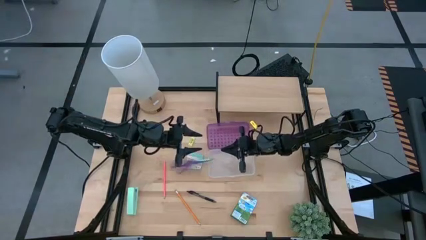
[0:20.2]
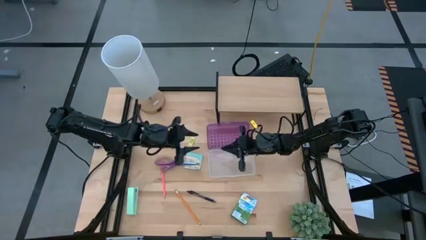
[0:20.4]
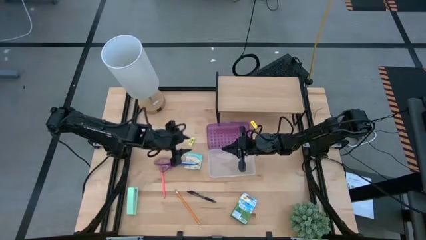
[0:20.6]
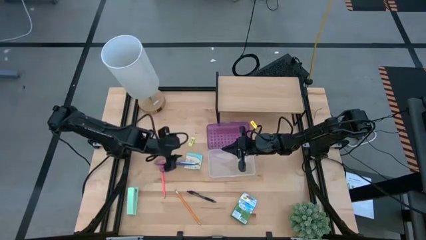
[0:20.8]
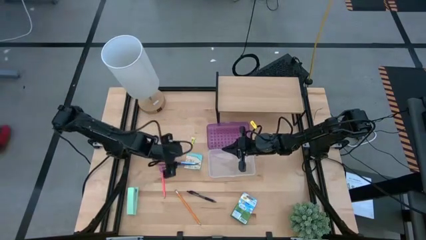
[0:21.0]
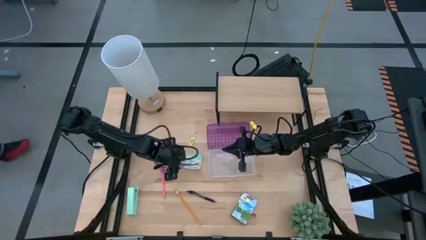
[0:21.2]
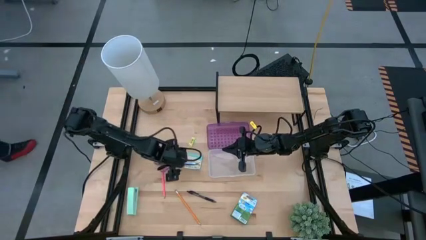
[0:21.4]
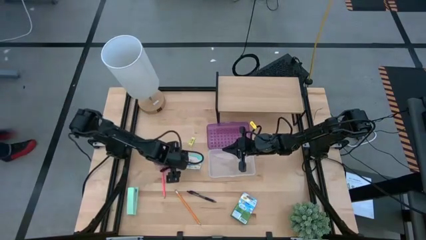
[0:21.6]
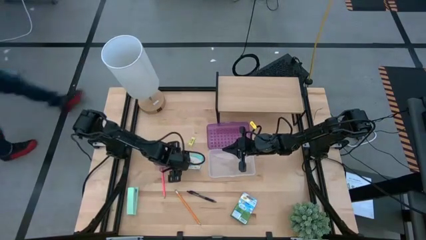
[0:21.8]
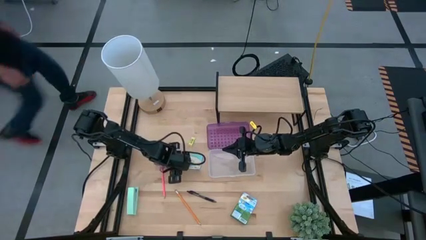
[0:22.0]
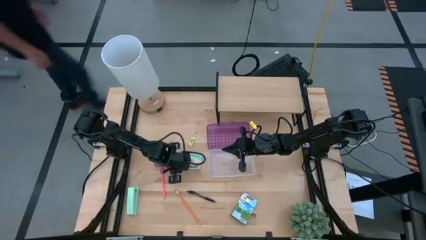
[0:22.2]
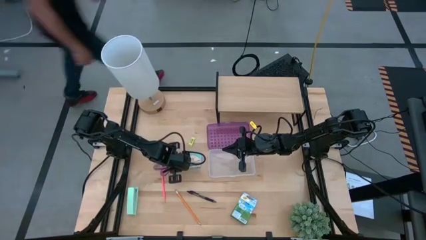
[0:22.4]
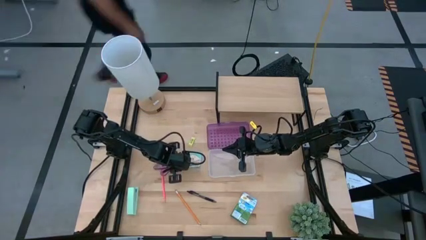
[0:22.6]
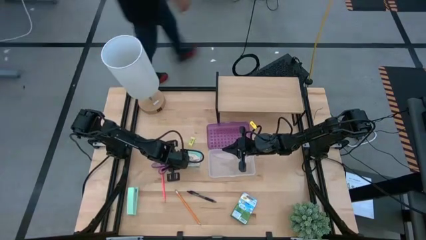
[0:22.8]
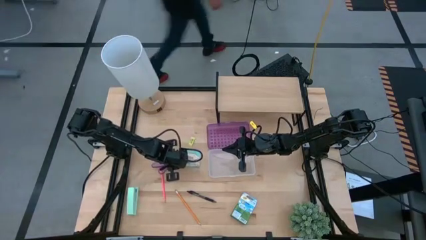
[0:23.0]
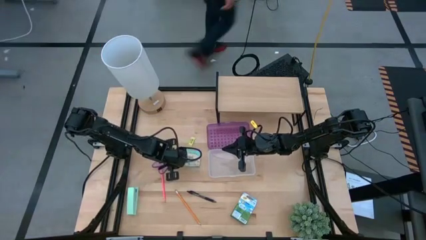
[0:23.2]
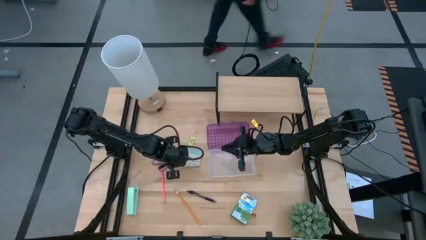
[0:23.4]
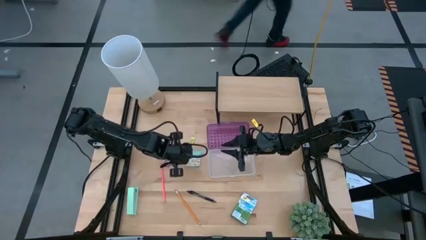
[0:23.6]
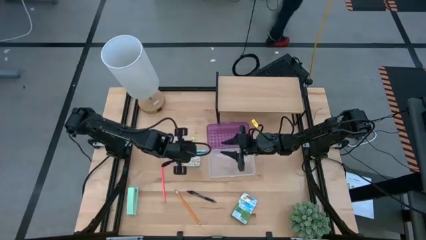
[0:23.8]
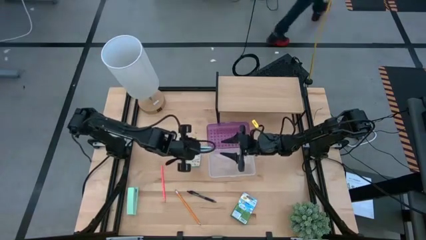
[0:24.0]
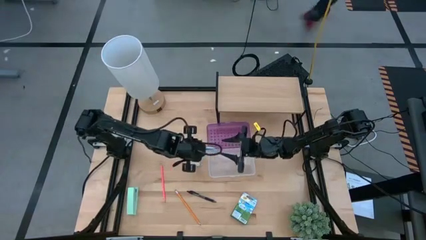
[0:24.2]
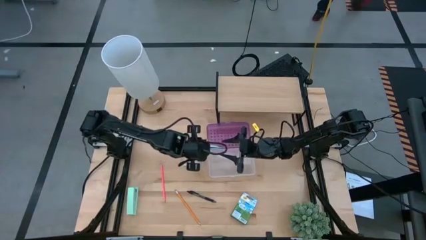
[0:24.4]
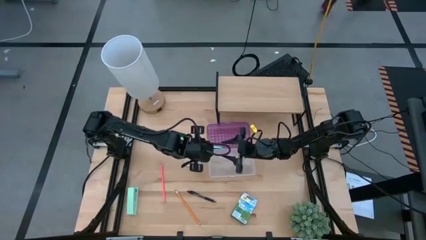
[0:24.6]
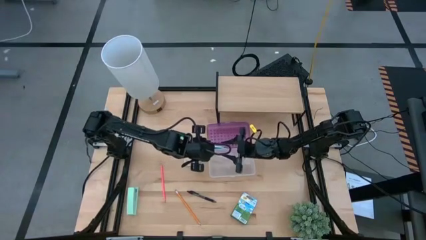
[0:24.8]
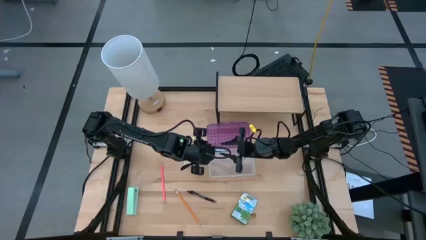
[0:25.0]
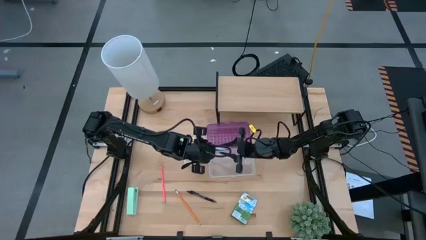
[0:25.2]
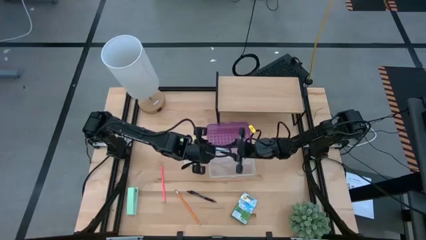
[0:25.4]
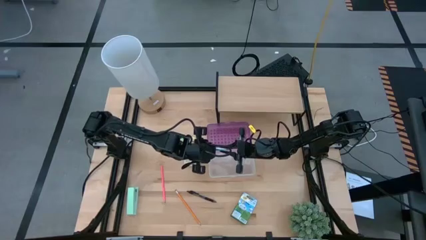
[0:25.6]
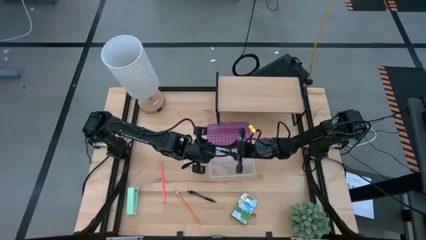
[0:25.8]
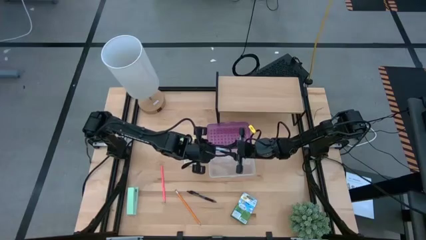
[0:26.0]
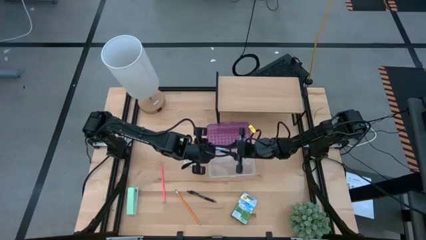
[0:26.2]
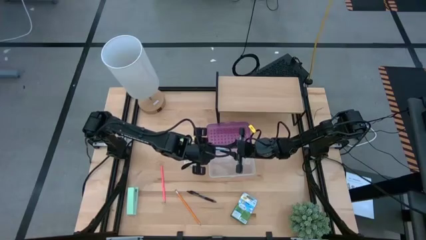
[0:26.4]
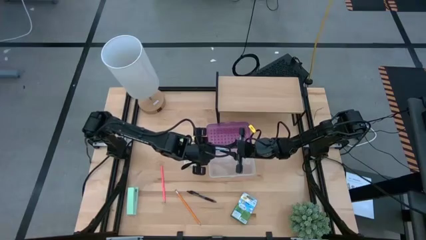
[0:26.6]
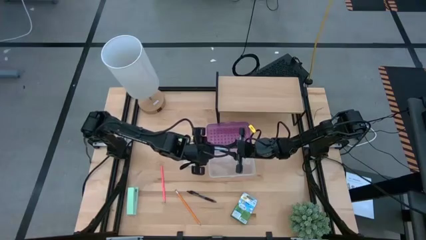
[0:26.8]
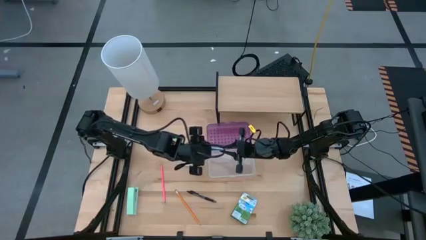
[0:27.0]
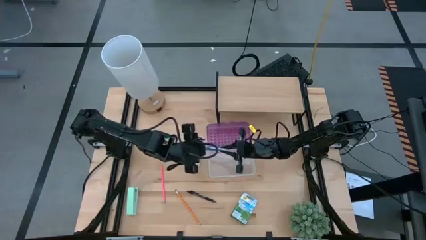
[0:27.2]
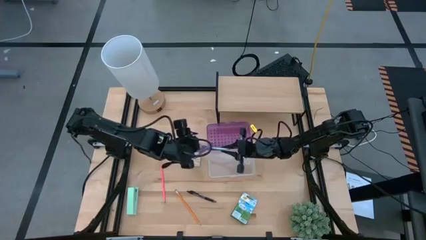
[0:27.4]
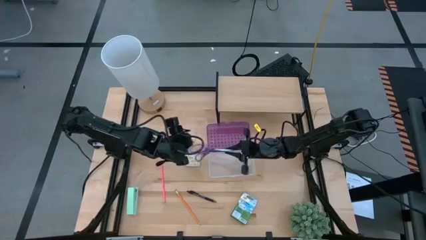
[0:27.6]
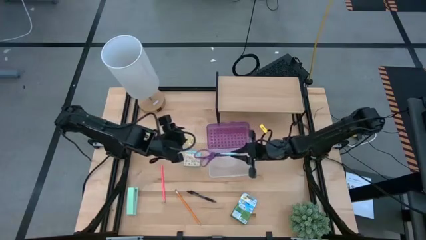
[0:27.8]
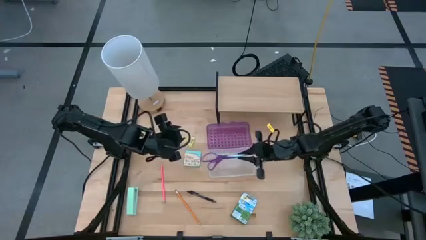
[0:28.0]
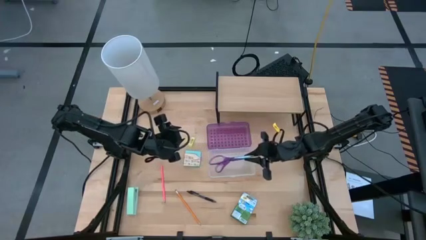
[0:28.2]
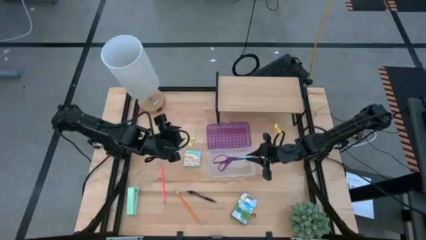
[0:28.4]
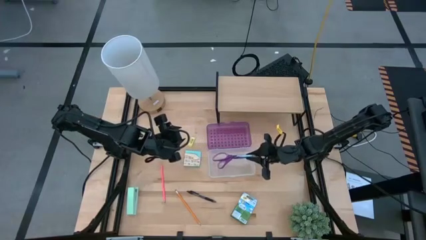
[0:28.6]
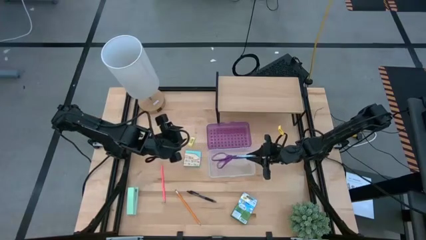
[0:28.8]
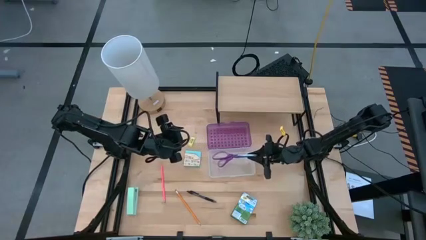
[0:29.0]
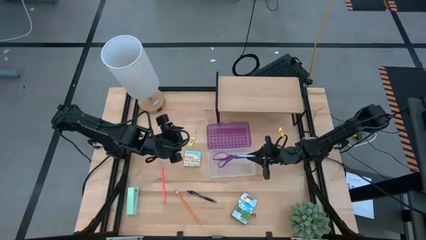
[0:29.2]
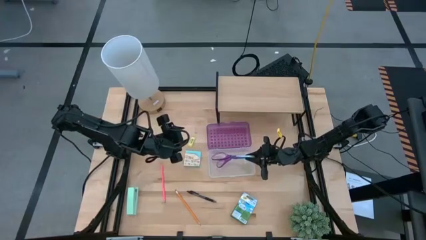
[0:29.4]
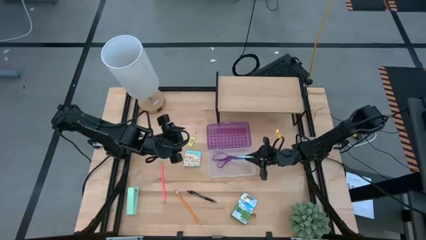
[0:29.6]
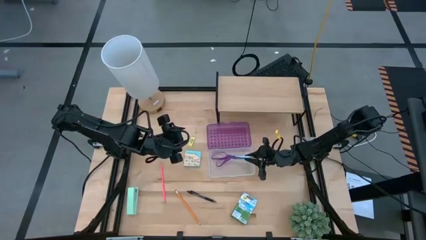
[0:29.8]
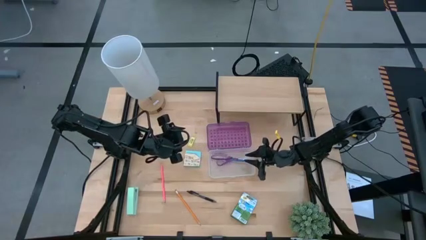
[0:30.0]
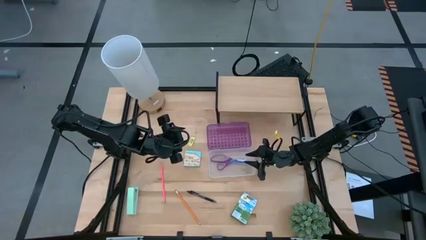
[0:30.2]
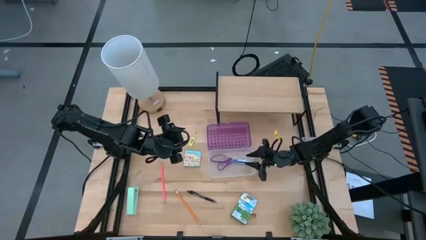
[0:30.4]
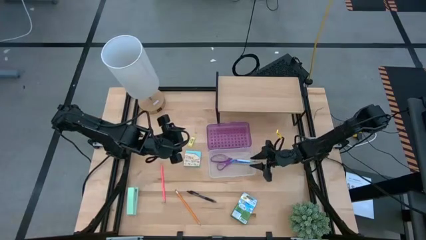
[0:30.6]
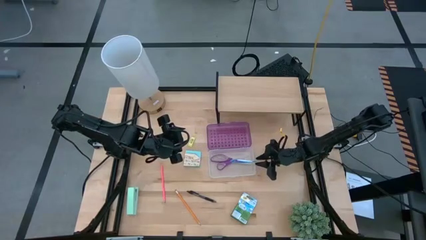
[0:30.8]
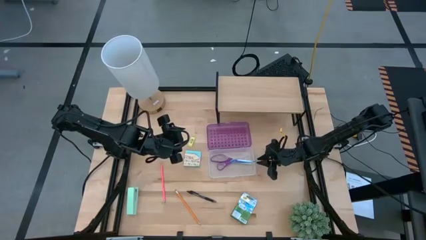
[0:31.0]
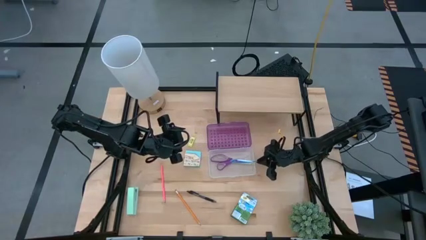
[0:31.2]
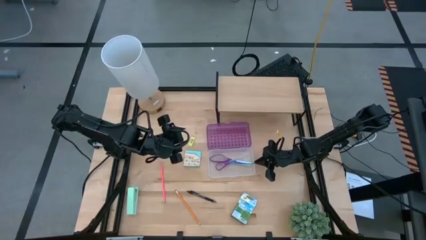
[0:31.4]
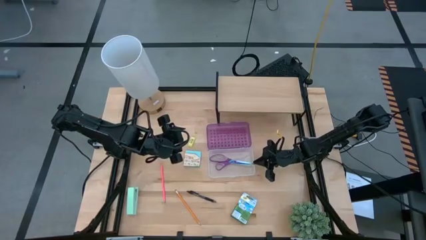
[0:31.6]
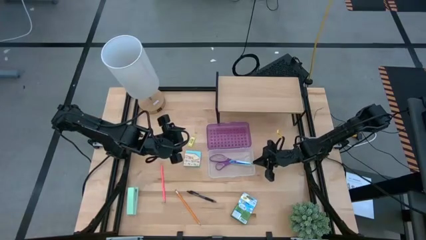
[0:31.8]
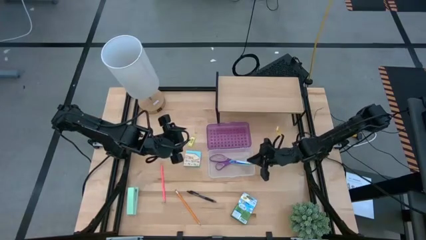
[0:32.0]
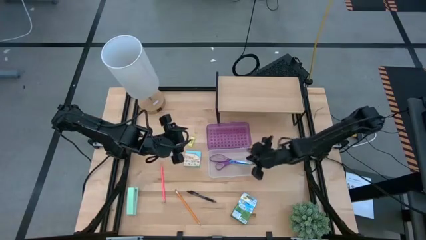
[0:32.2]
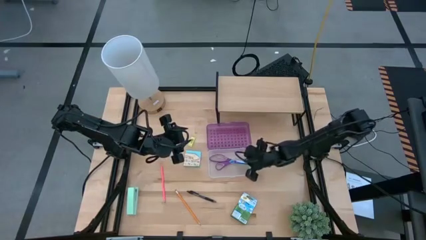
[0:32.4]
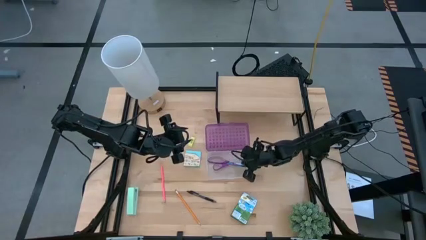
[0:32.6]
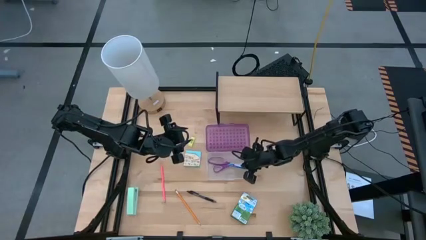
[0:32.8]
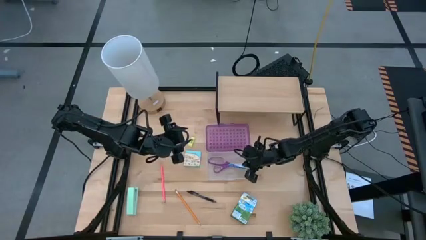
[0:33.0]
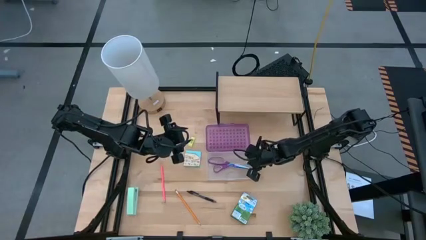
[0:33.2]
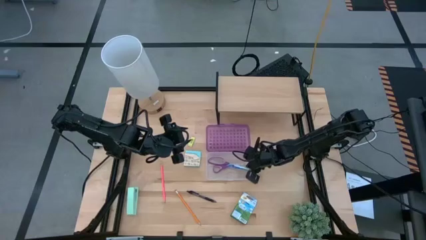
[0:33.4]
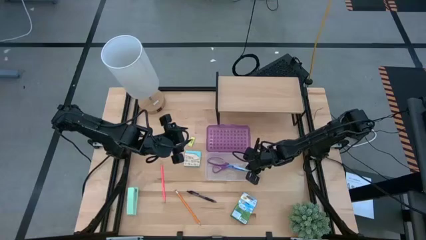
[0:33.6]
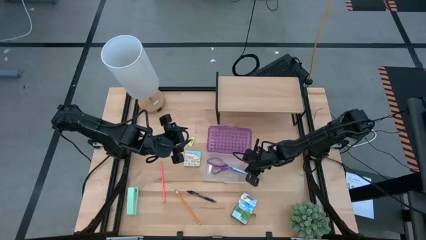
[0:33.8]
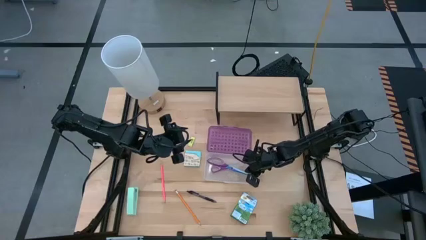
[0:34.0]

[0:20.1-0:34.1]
Task: Pack school essentials
Put the purple scissors into the purple supply box

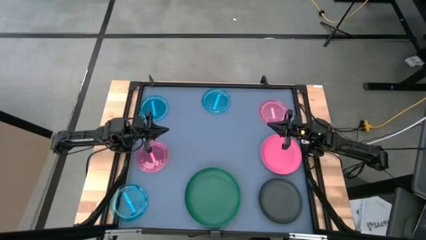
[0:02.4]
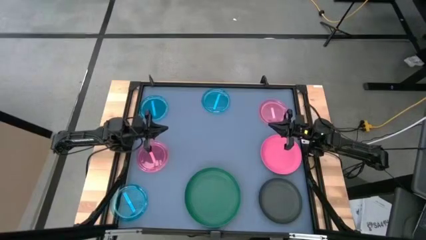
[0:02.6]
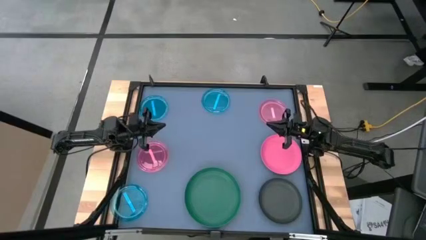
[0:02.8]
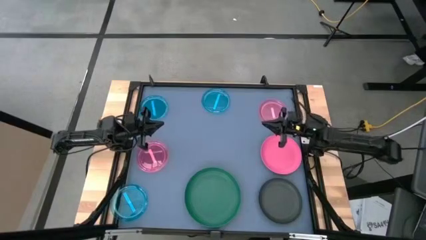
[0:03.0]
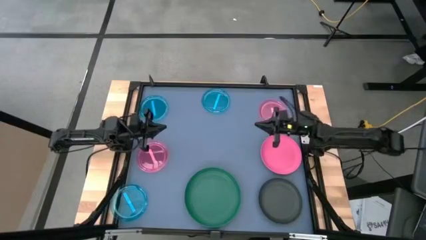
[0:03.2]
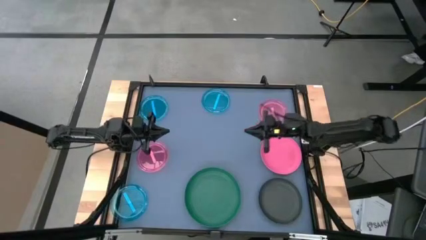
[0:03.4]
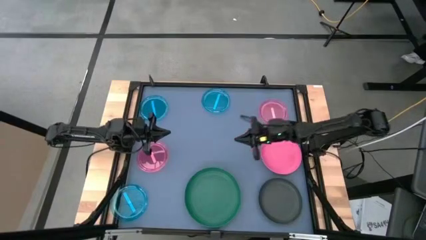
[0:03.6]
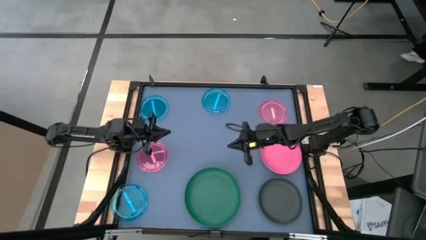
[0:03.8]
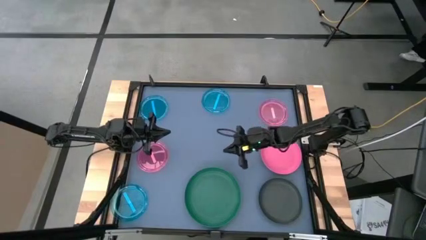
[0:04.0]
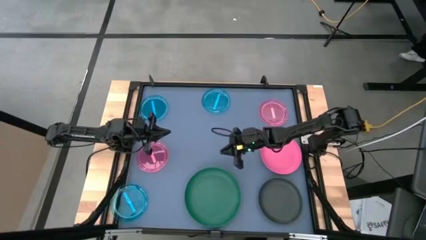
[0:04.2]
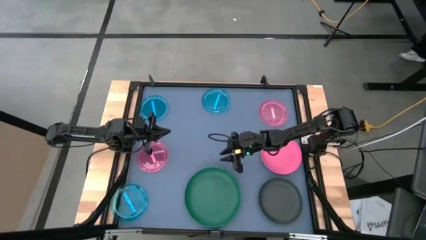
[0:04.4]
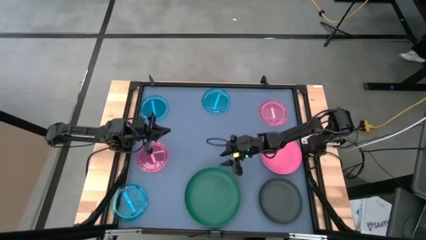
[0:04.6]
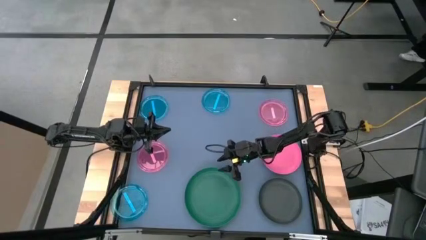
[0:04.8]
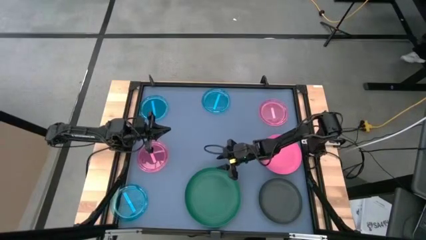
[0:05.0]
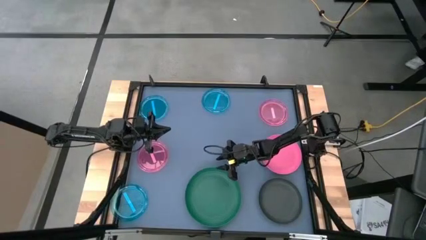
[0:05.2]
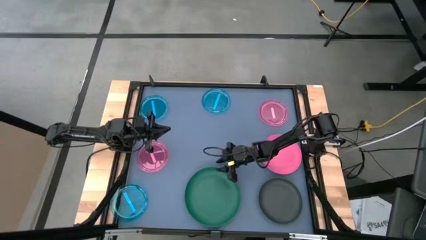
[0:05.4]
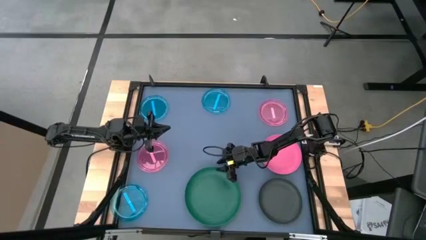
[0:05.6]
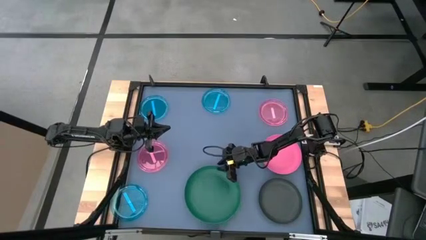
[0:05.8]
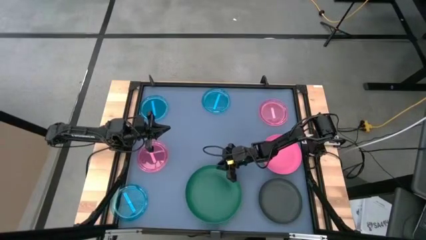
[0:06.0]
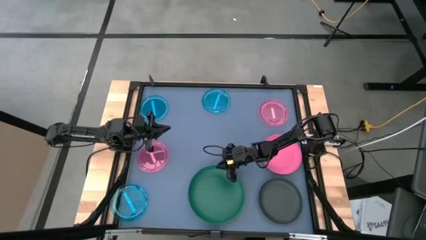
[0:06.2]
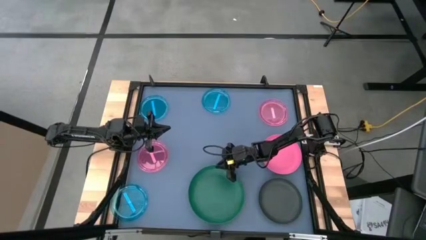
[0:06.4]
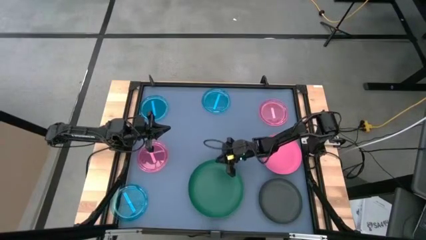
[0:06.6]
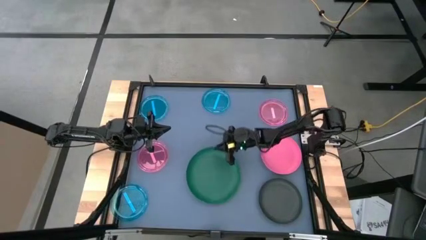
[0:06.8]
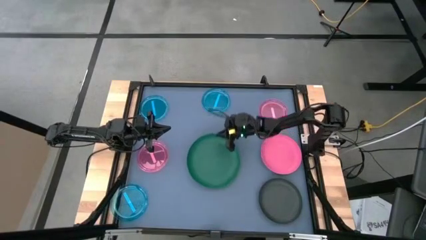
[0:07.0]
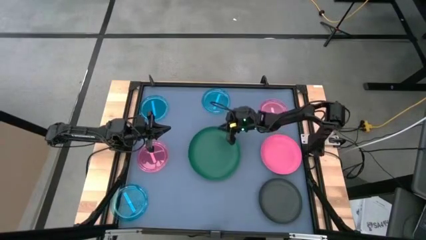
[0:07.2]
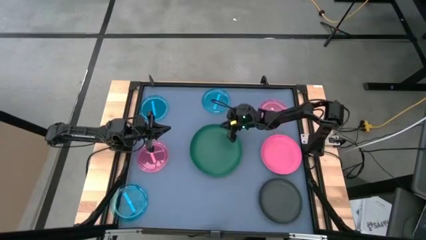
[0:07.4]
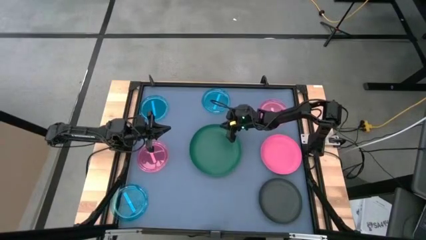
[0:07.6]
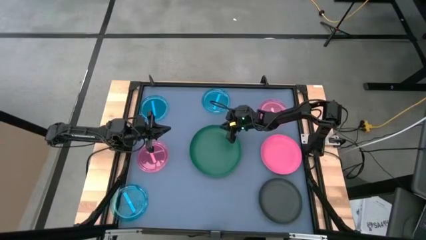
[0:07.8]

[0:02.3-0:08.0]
Task: Stack plastic plates
Move the green plate from the bottom to the center of the table
